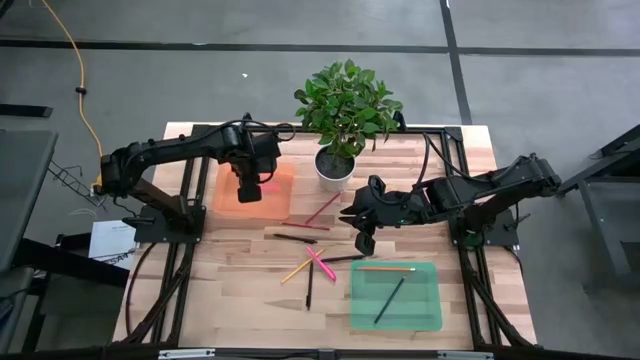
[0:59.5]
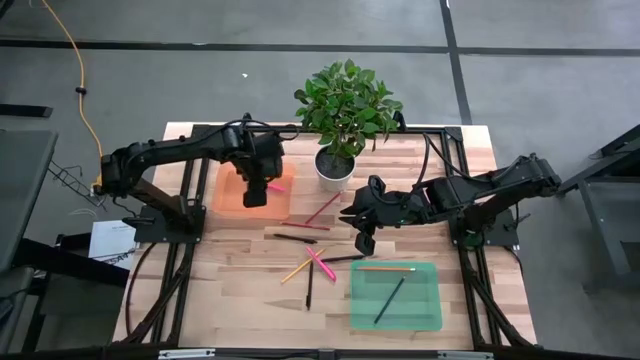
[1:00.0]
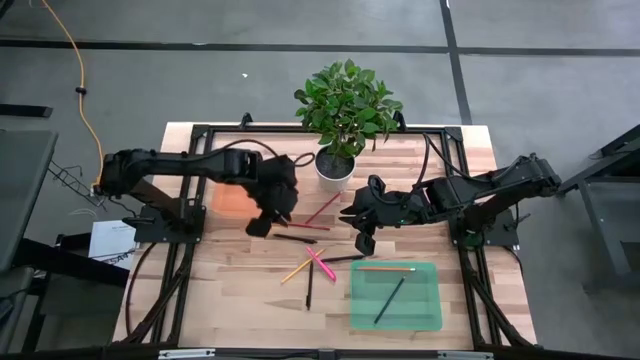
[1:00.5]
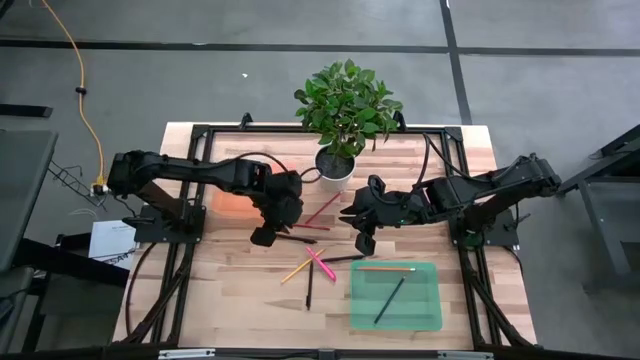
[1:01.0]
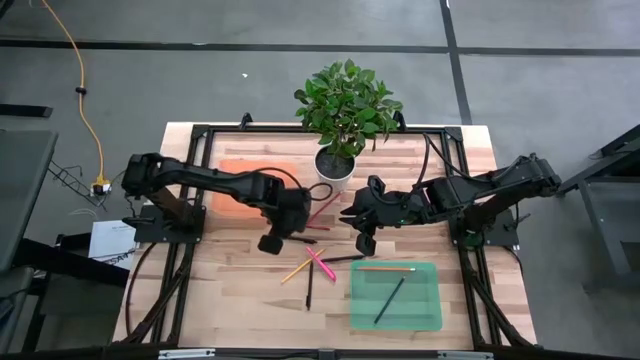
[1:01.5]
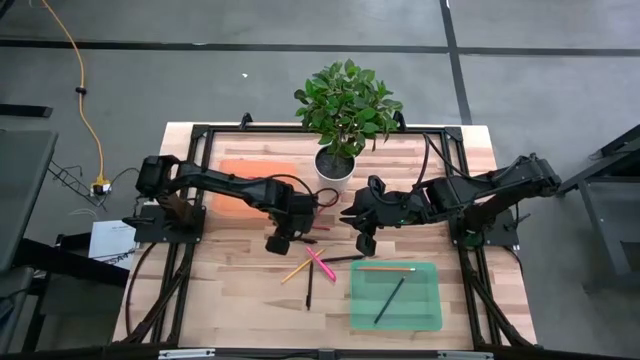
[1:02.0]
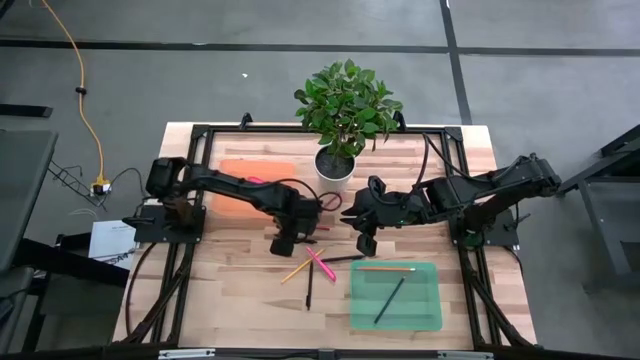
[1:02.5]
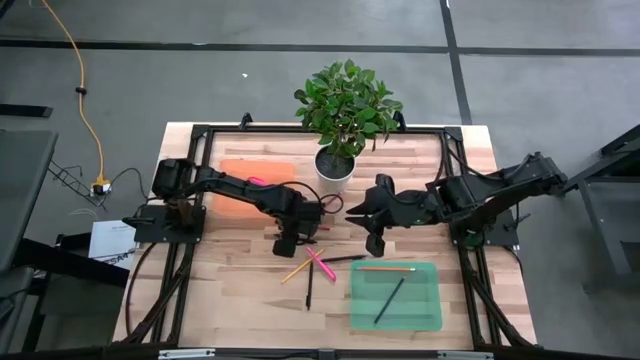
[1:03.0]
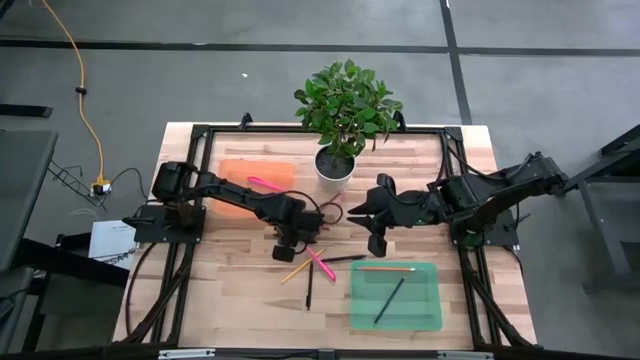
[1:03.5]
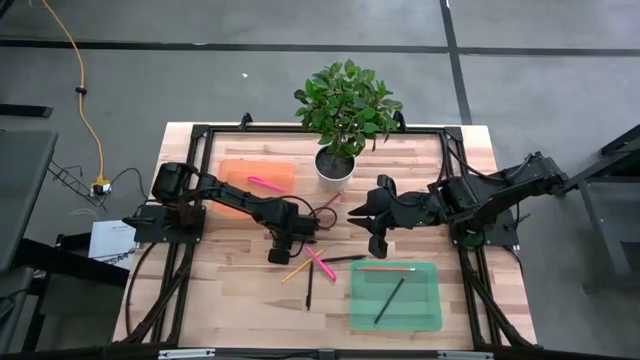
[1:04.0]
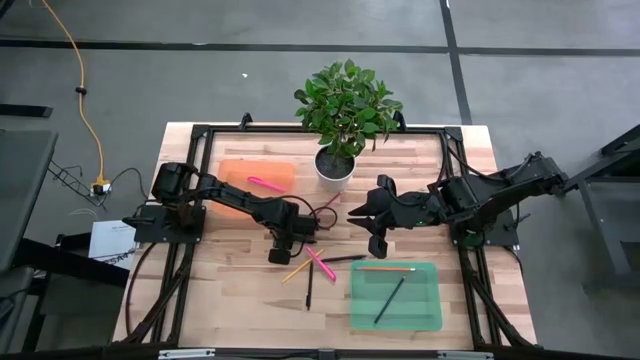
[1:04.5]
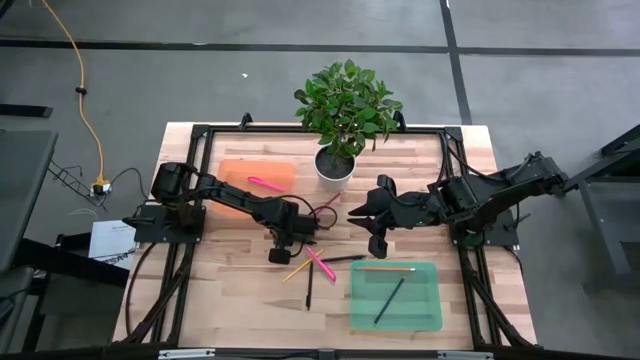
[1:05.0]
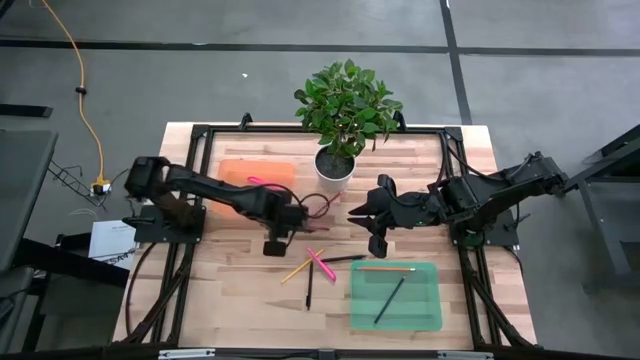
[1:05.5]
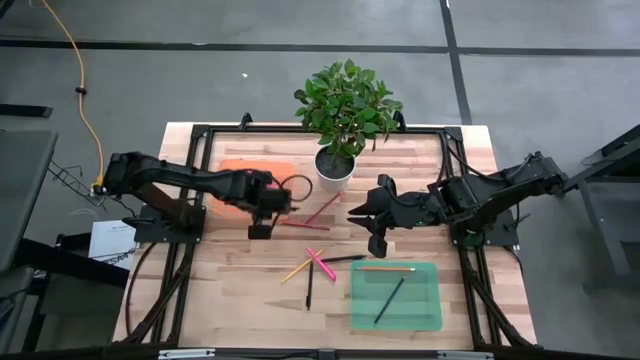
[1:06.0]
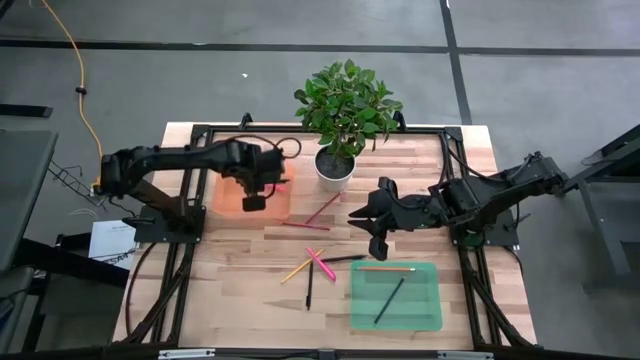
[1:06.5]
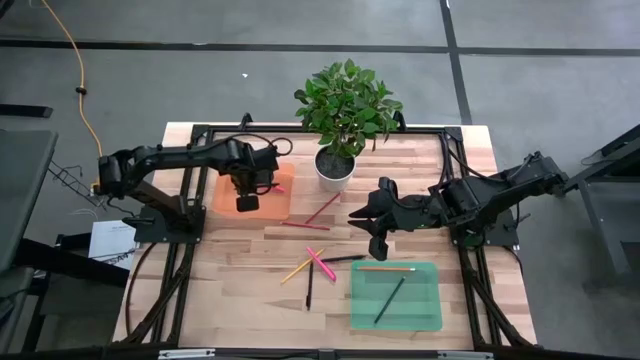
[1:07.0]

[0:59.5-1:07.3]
Task: Sort pens & pencils
Put the top black pen into the orange bin

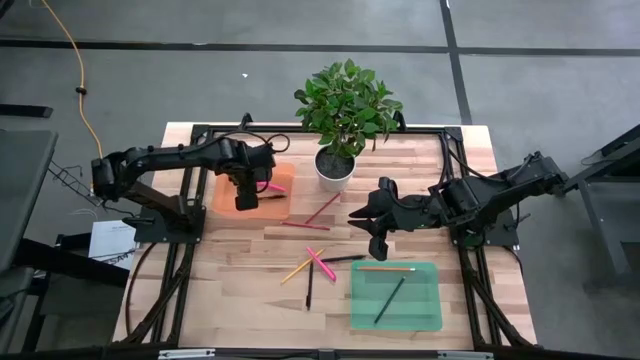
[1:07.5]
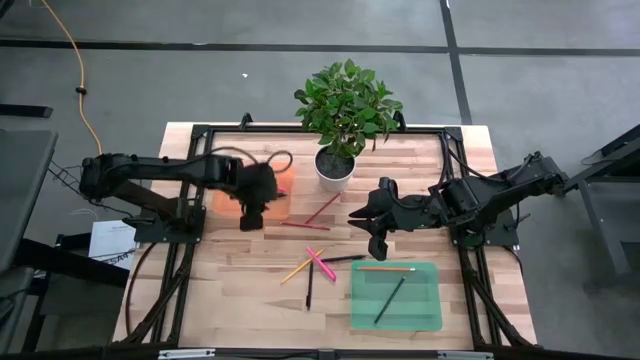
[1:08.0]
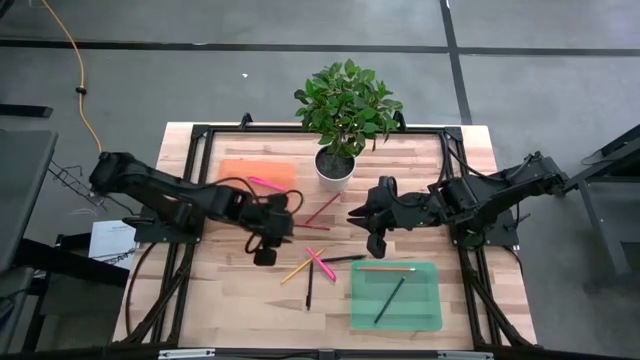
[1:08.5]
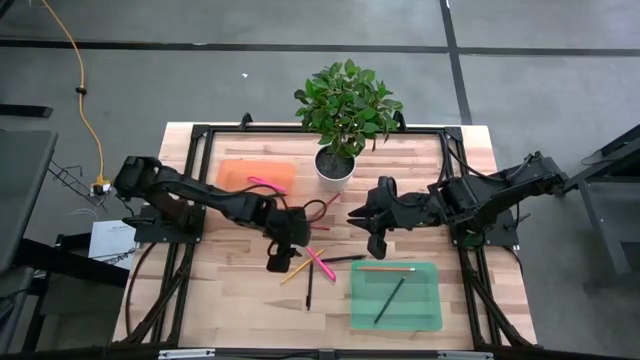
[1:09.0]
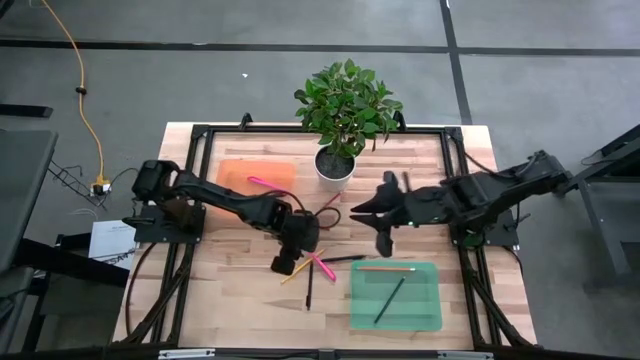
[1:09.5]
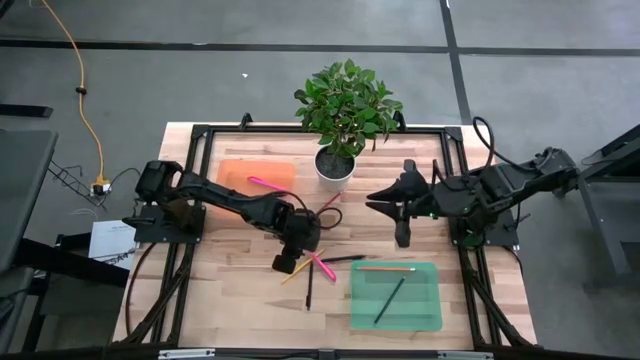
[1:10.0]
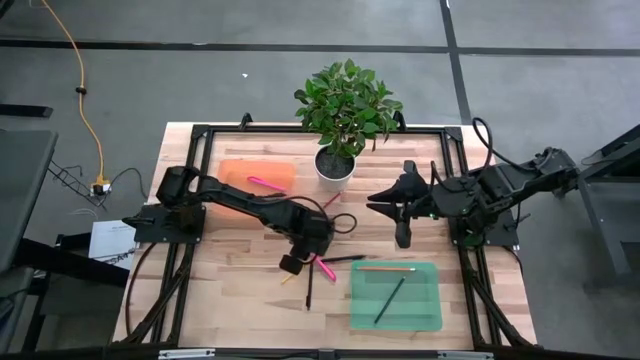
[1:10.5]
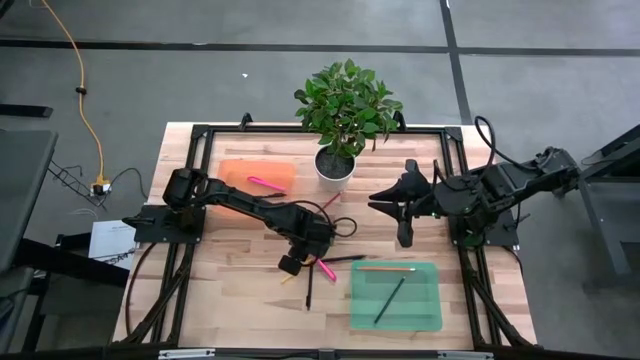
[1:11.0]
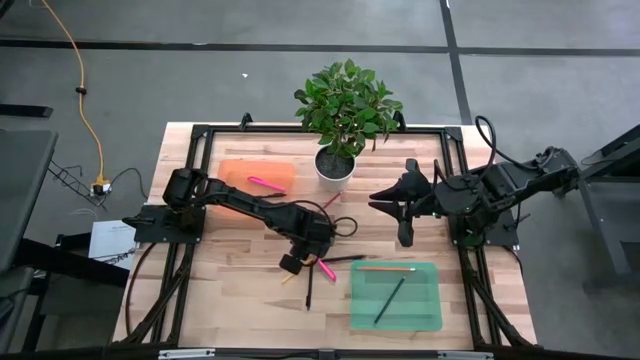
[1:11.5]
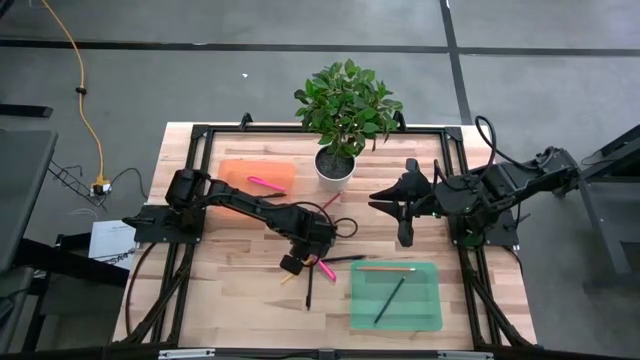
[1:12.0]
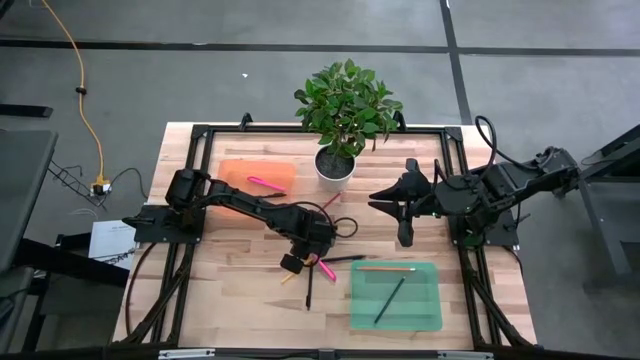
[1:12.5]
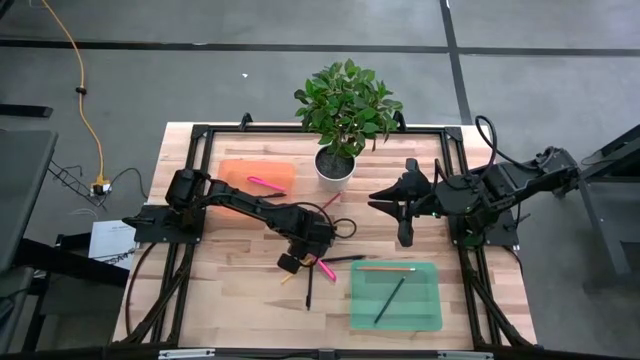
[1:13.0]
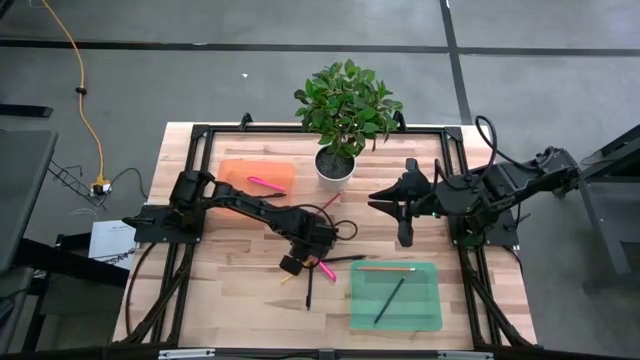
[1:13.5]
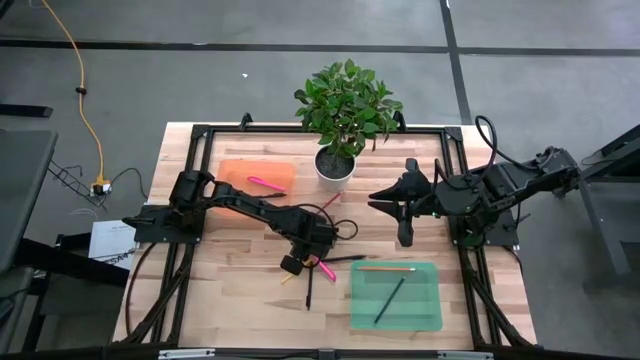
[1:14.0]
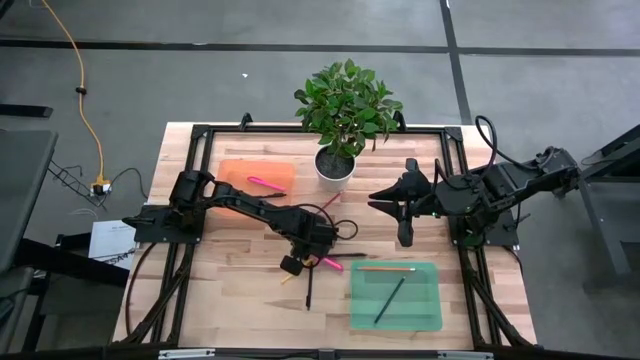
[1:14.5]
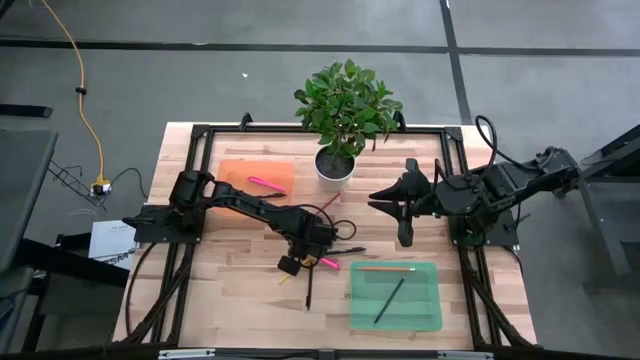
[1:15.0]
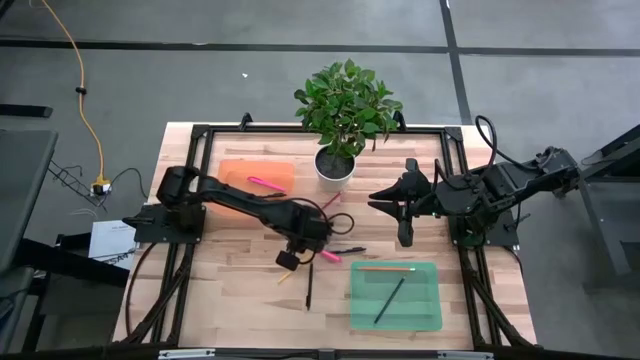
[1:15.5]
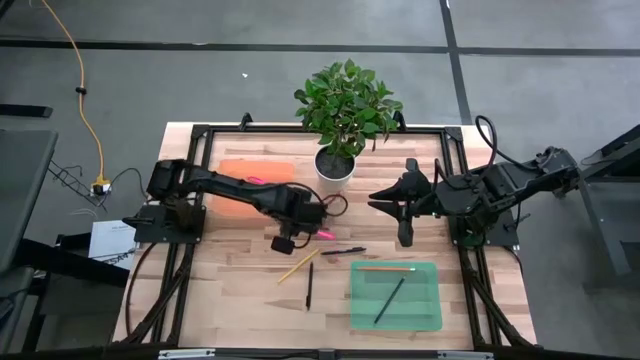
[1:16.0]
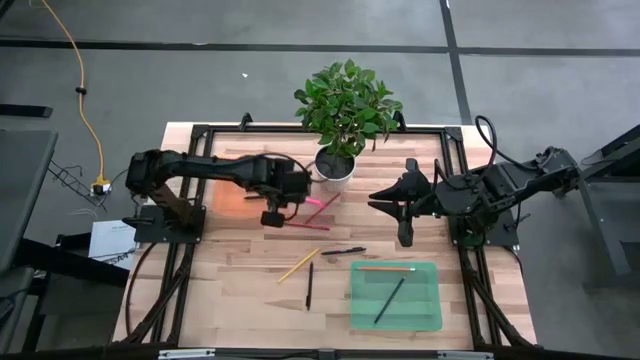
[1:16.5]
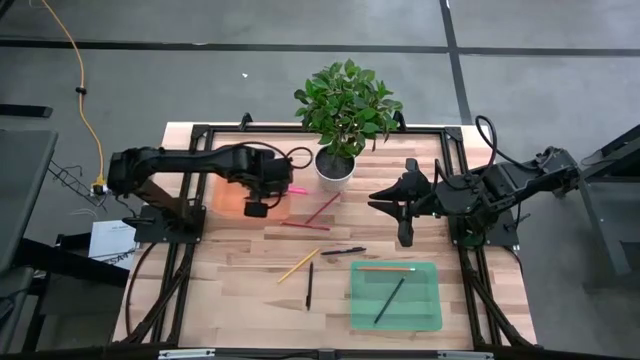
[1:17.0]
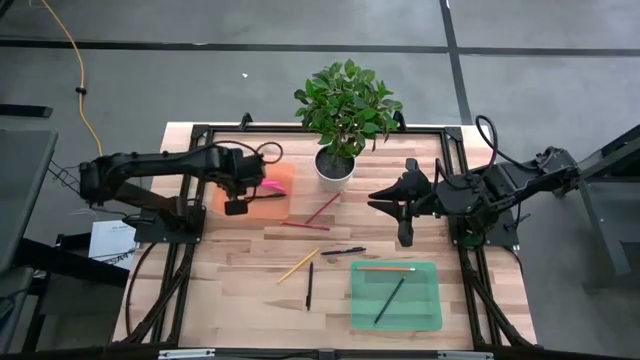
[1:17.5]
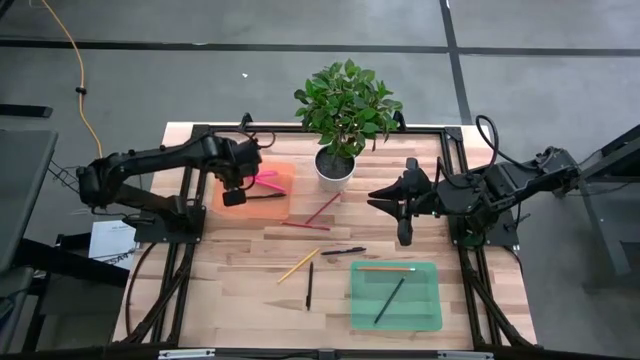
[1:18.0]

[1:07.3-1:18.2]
Put the pink pen into the orange bin
